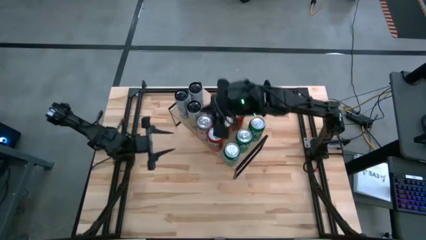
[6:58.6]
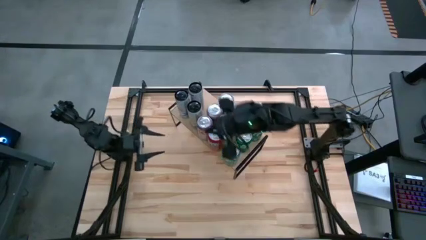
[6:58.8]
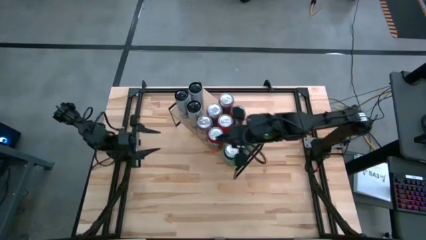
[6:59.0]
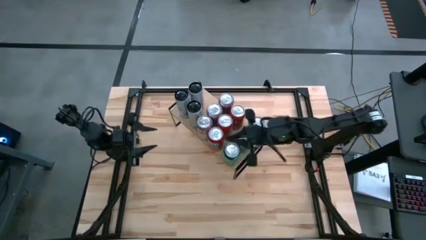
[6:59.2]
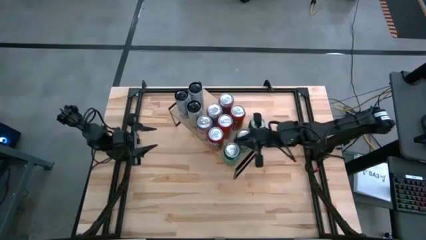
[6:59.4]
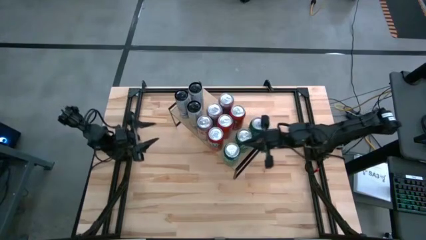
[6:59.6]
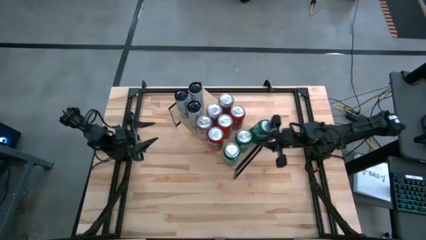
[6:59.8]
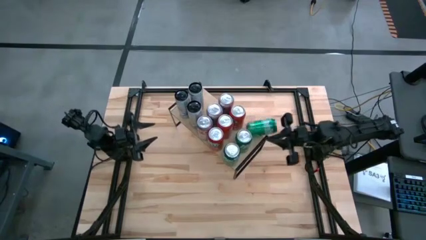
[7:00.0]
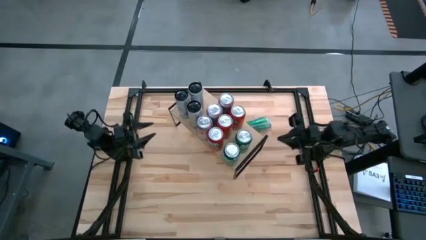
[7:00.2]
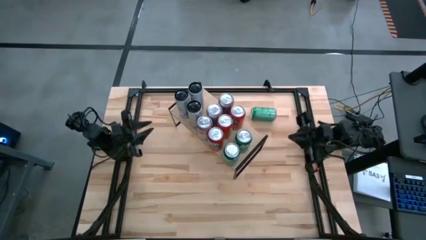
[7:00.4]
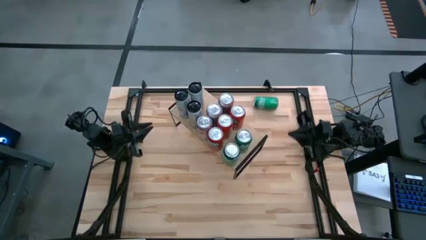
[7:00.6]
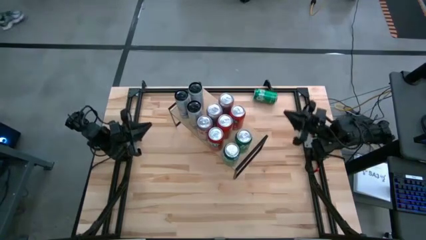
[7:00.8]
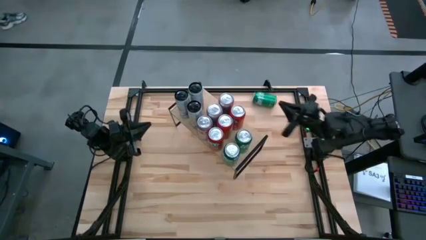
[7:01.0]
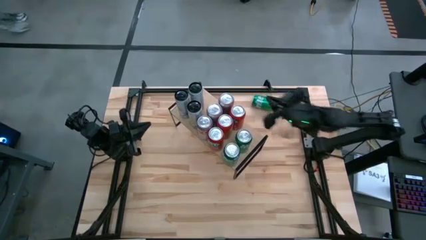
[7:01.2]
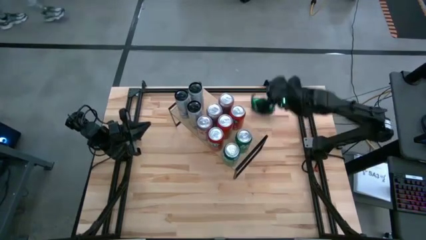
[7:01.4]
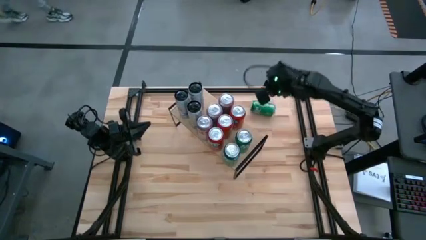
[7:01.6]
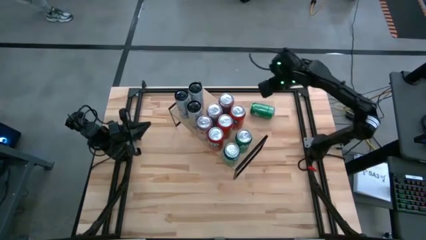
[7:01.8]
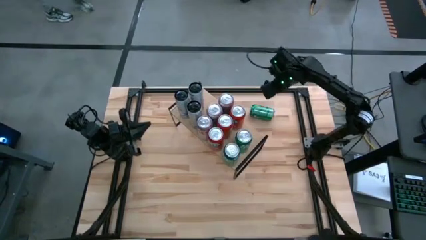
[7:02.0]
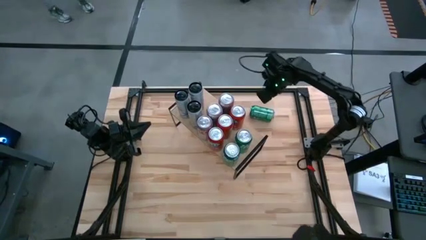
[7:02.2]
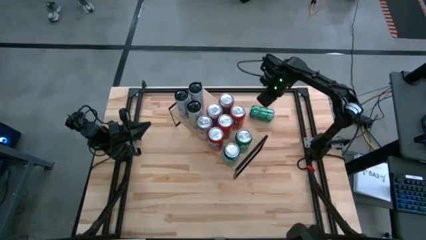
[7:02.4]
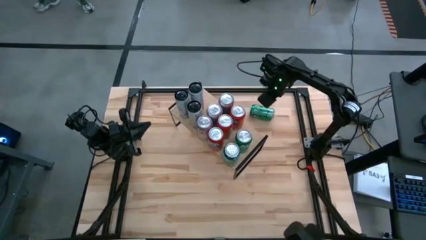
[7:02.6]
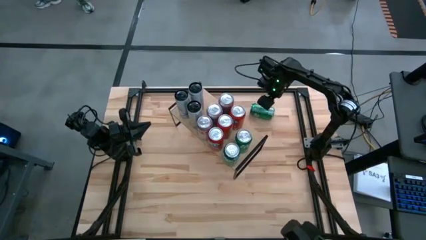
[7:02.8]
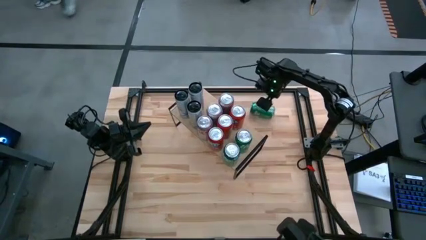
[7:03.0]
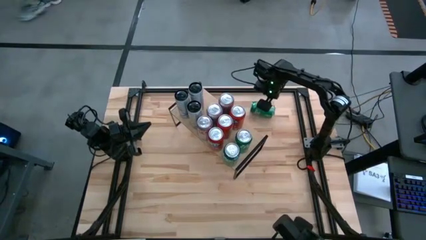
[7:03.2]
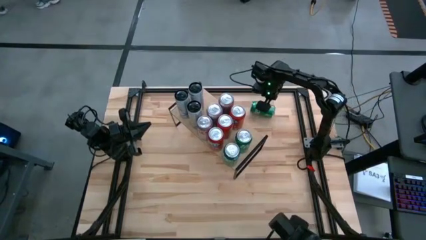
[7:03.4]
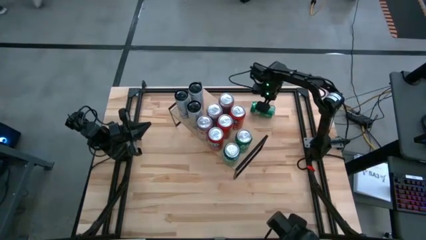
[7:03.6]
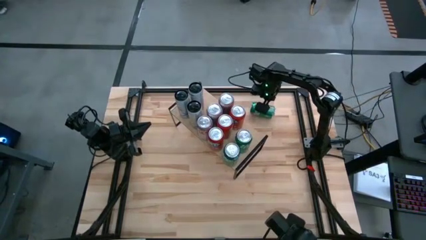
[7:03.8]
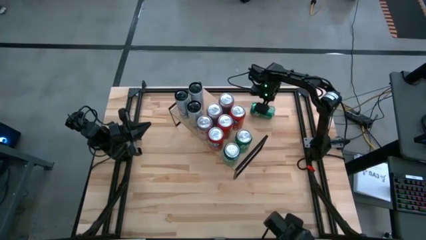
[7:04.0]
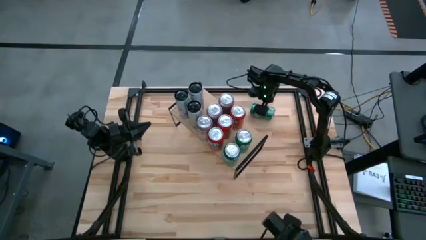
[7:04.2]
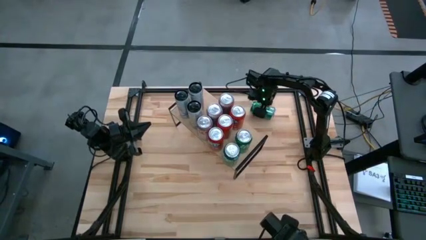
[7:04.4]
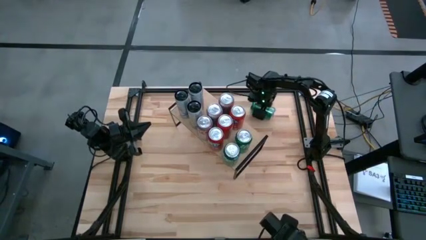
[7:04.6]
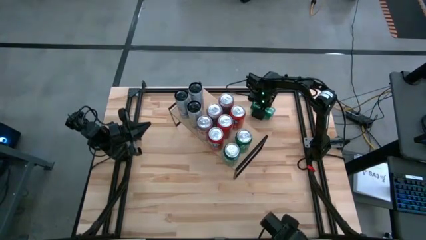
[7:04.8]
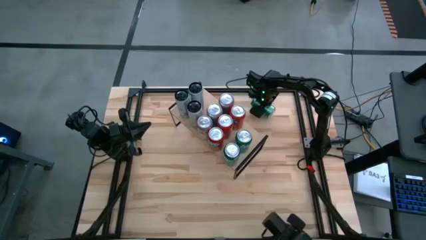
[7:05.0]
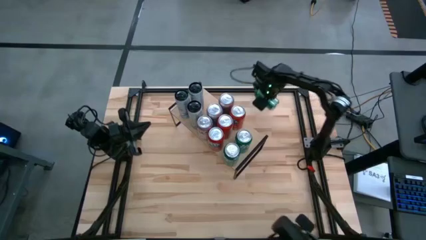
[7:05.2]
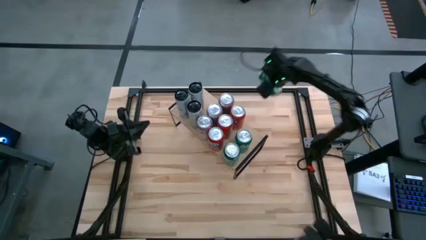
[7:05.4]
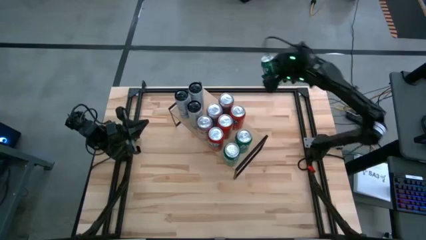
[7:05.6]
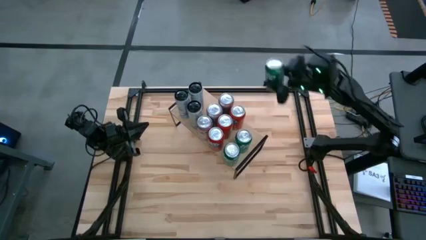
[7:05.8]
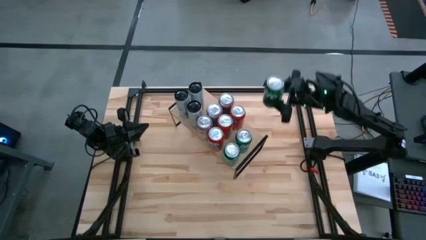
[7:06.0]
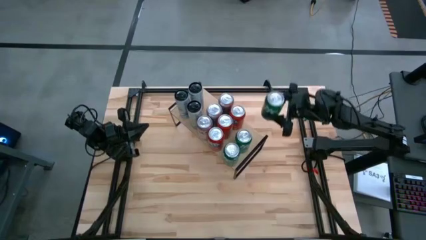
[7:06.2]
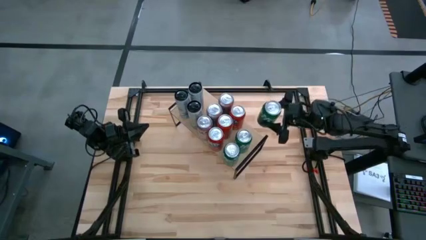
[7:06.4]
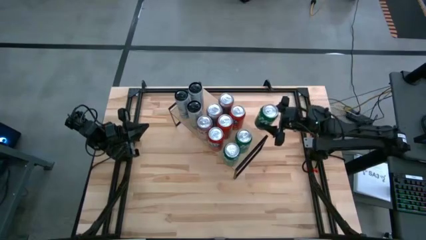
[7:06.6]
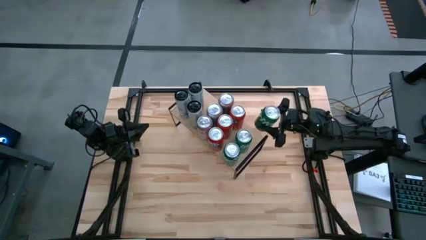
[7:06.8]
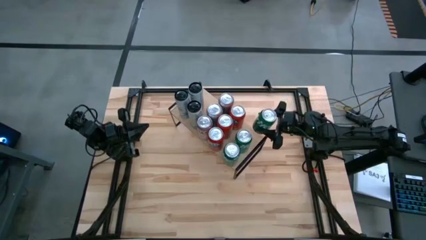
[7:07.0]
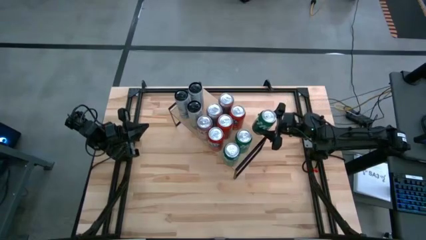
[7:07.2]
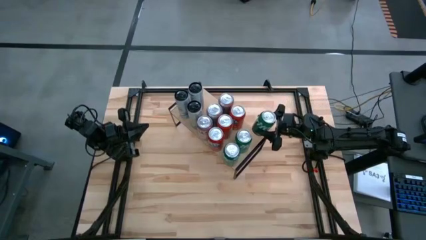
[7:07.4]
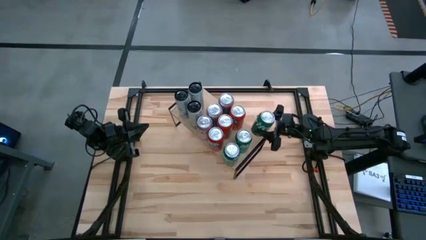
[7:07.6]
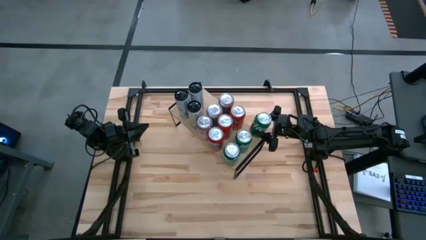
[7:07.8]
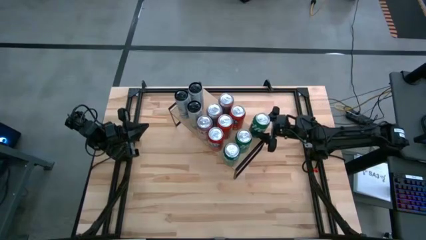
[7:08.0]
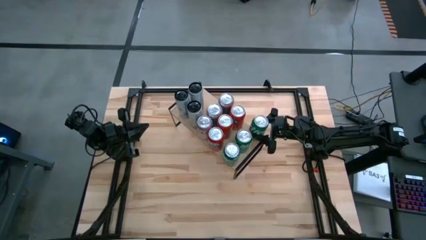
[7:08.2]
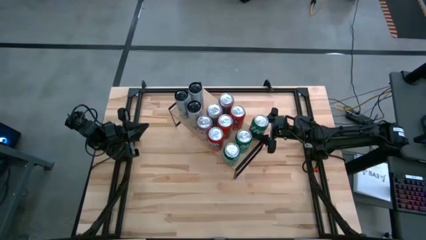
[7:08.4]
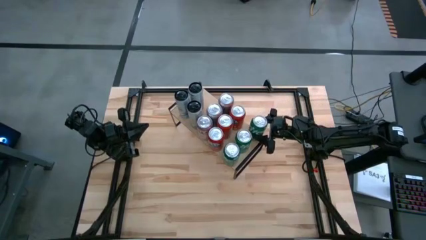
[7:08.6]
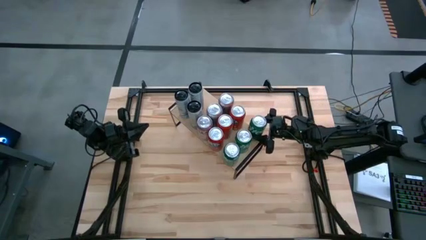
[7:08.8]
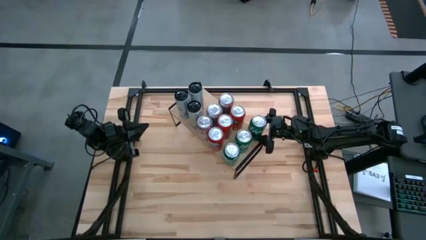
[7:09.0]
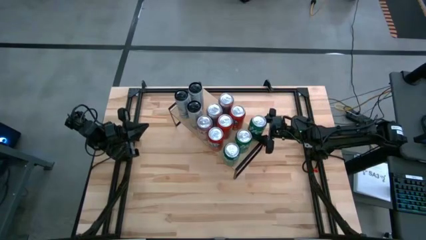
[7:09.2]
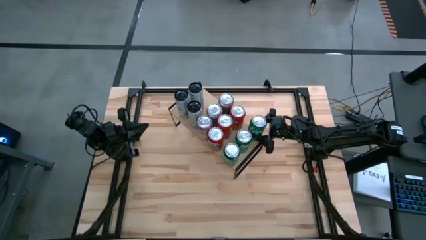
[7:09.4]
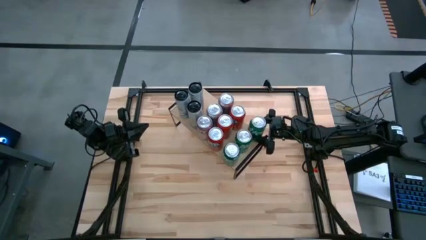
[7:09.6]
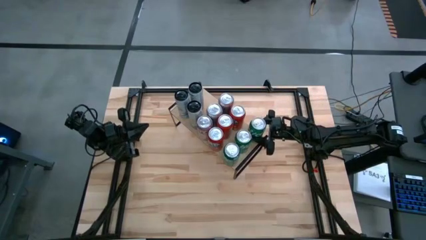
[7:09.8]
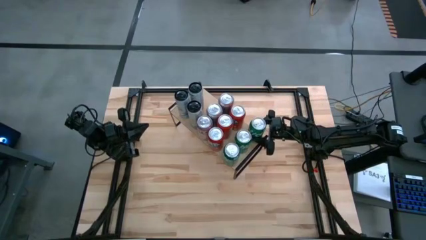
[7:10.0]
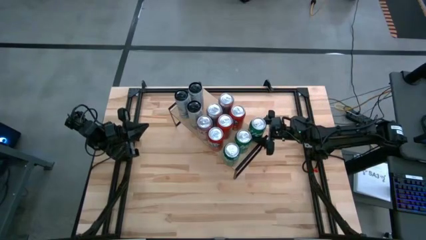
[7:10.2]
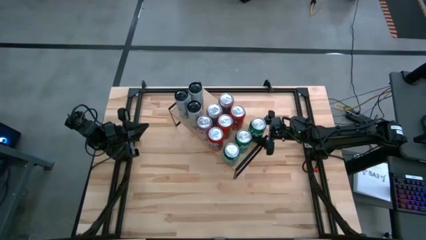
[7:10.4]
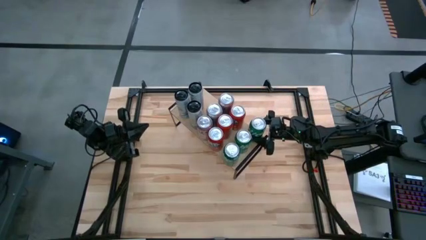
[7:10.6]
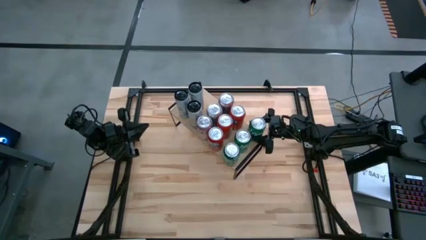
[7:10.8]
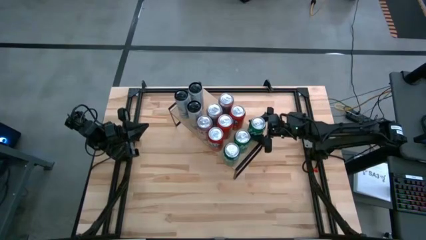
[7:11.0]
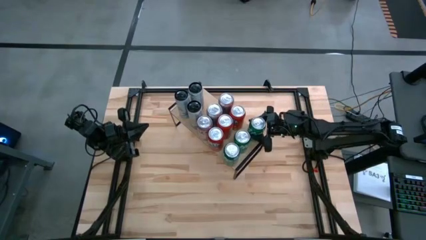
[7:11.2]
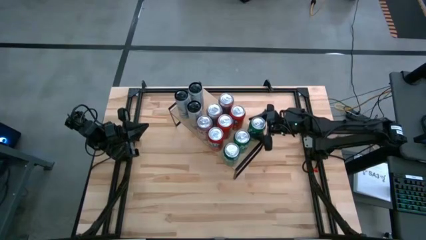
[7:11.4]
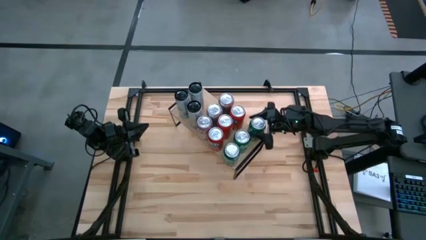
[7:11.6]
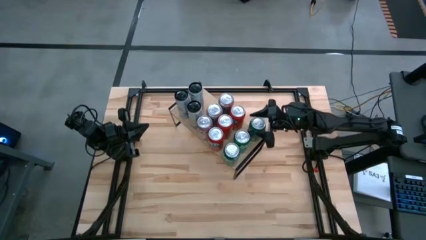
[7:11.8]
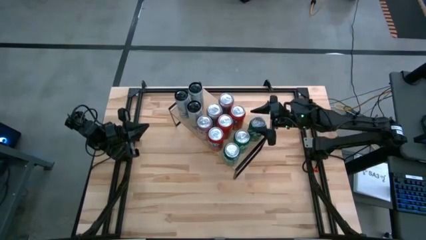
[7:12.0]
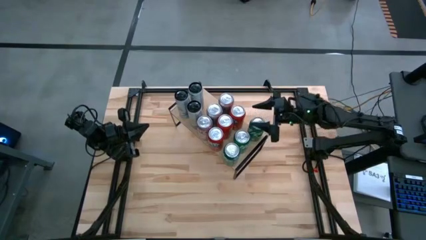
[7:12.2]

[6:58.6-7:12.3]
Task: Place canned beverage on shelf
Put the green soda can on the shelf aligned with the other green soda can

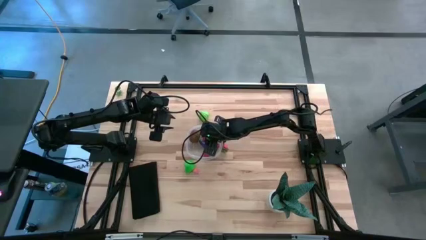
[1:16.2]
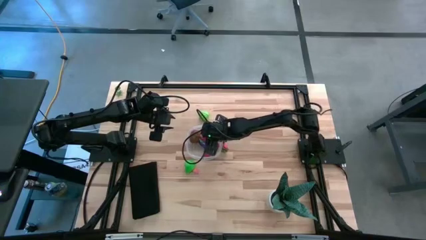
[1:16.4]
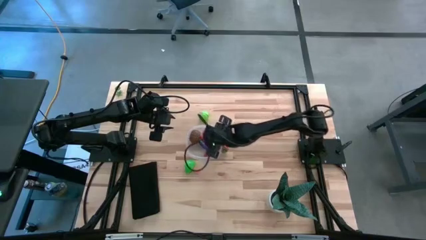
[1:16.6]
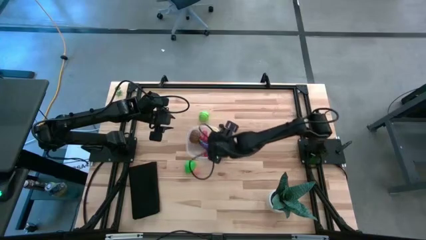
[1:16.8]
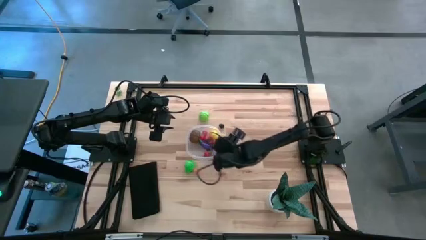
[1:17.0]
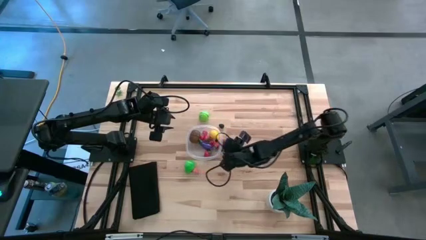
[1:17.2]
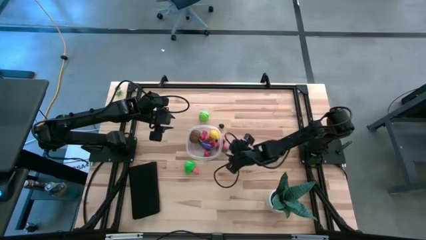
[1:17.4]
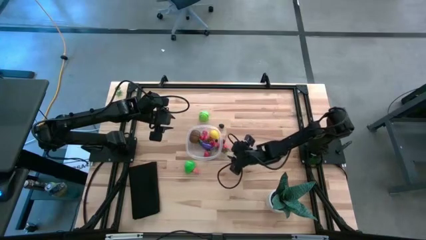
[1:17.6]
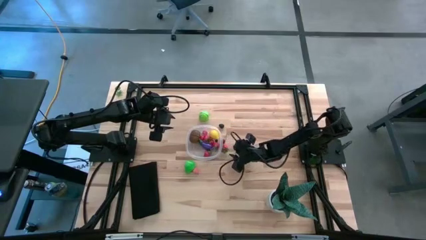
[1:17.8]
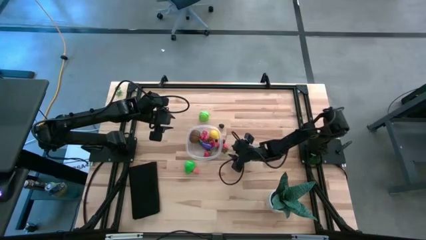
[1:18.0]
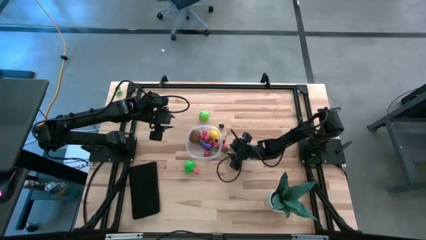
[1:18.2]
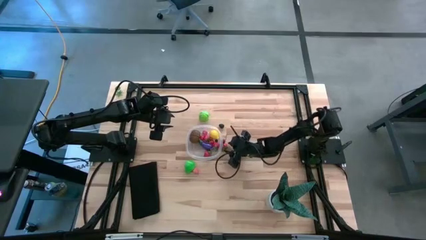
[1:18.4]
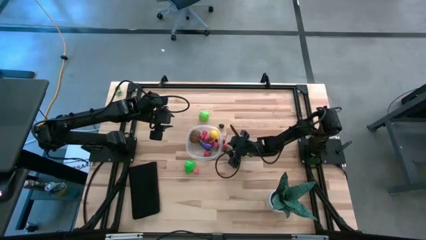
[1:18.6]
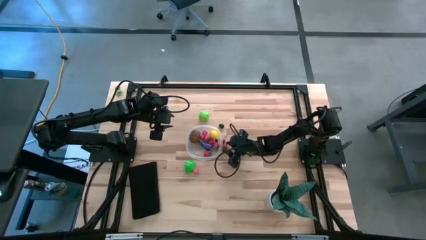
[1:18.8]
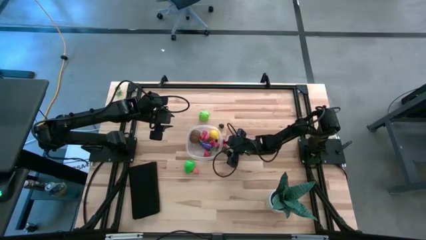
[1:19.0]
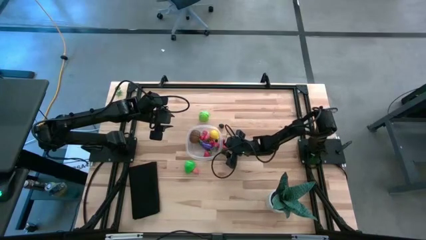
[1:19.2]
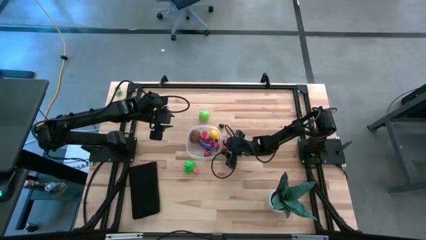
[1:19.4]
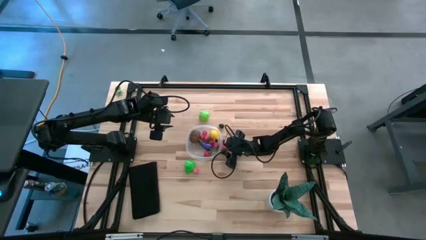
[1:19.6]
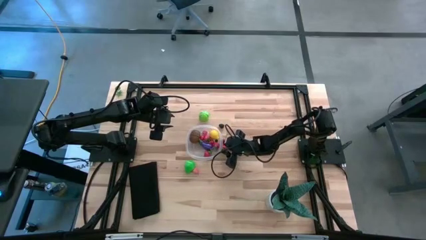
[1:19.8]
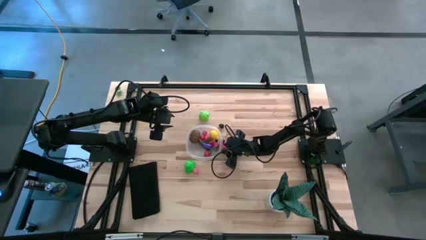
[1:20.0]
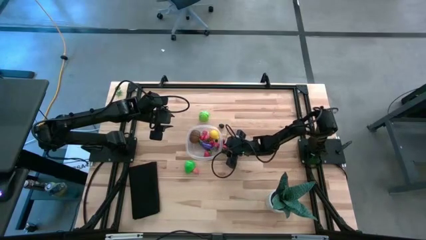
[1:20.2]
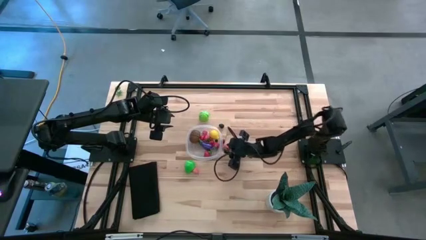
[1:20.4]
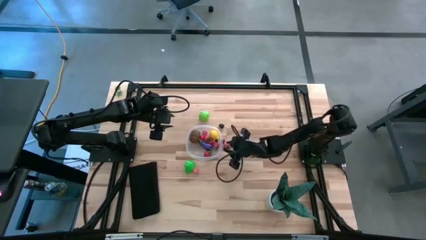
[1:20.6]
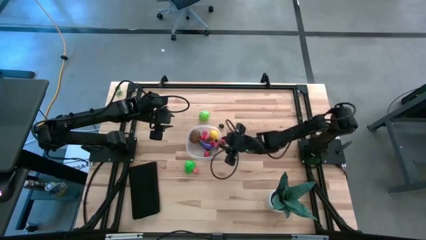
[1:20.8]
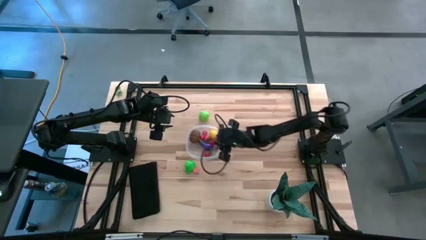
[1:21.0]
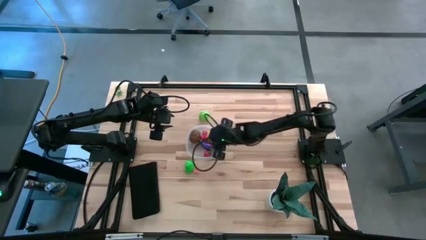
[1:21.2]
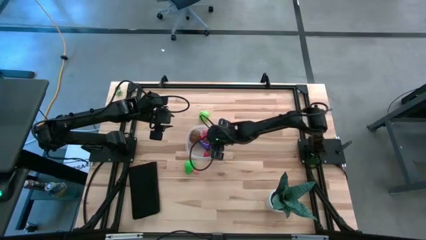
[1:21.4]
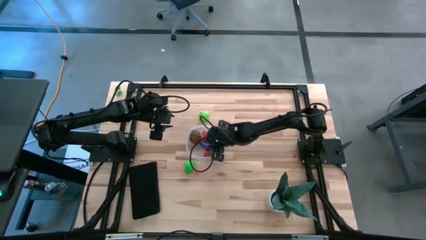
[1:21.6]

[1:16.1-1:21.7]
Task: Pick and placing Produce into tupperware
Put the strawberry into the transparent bin
